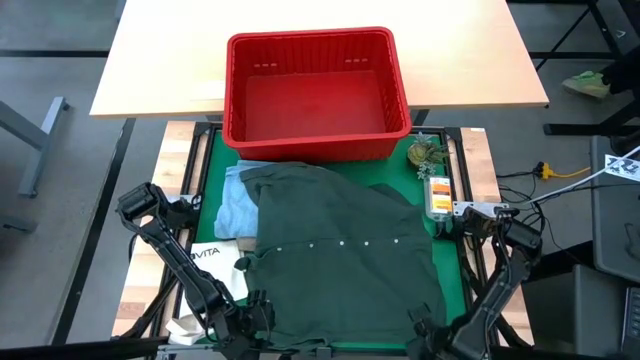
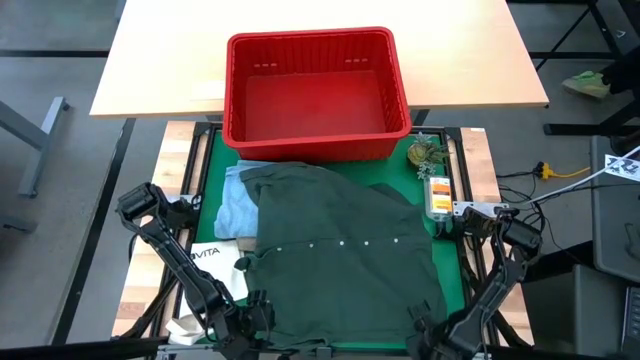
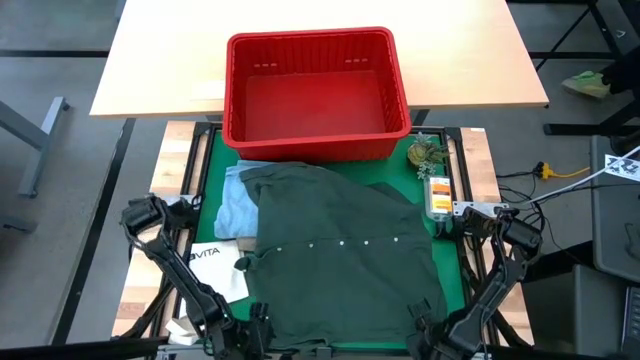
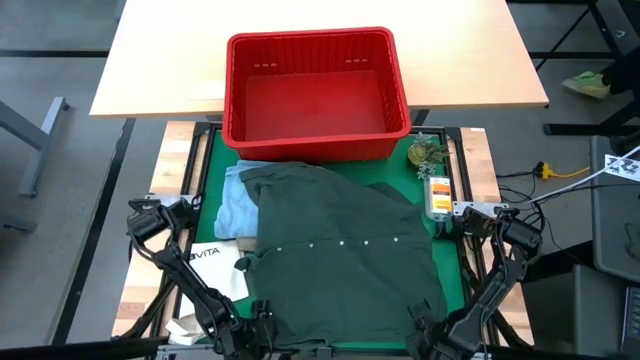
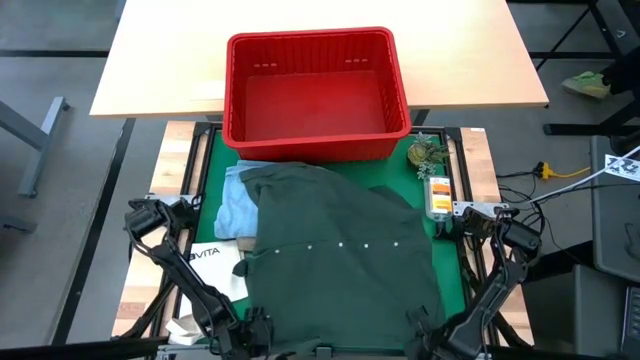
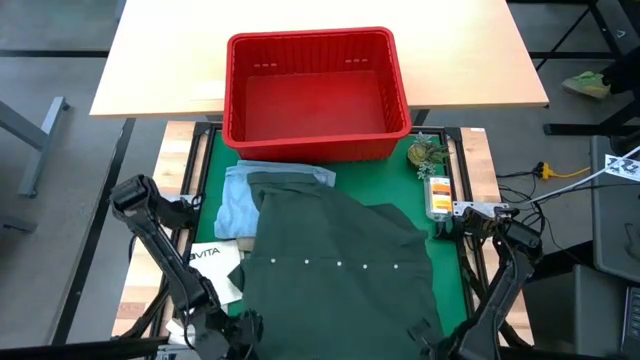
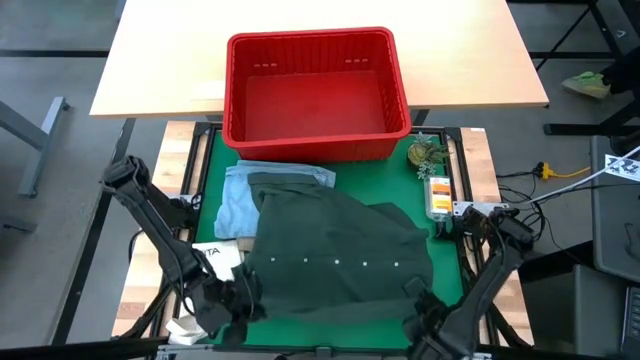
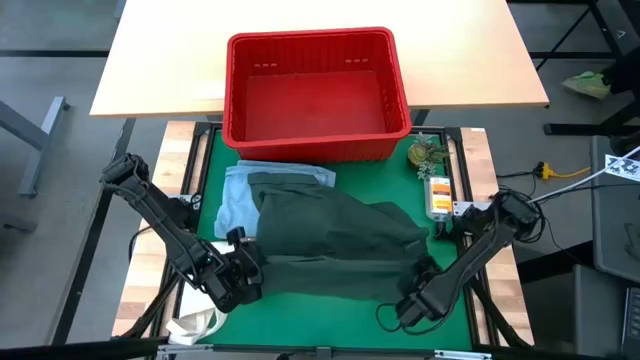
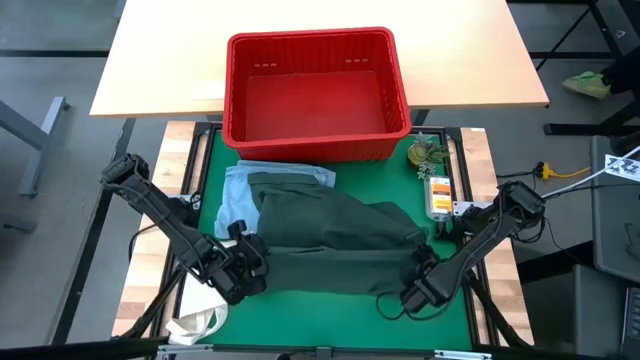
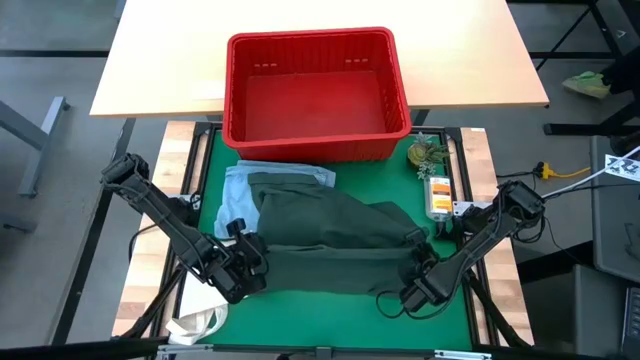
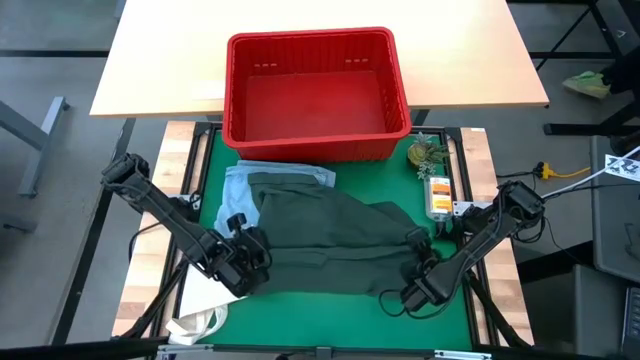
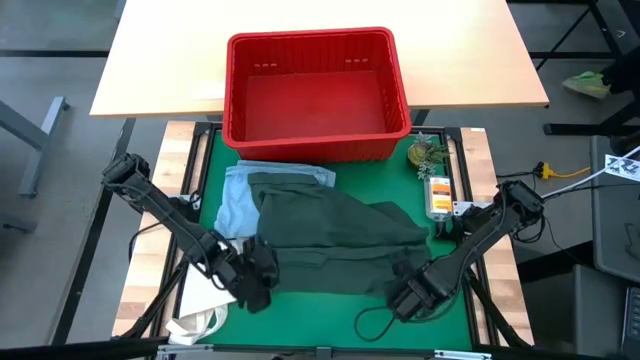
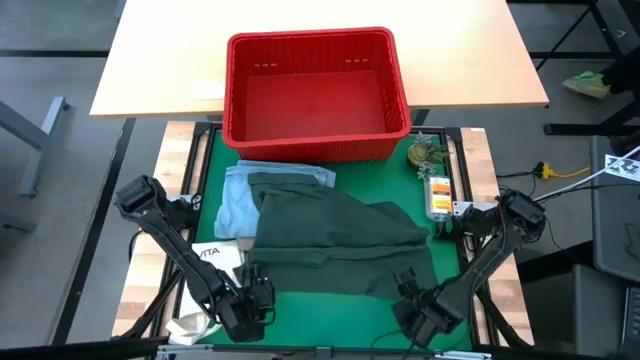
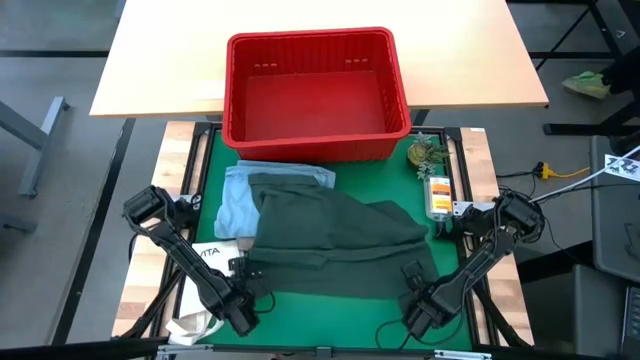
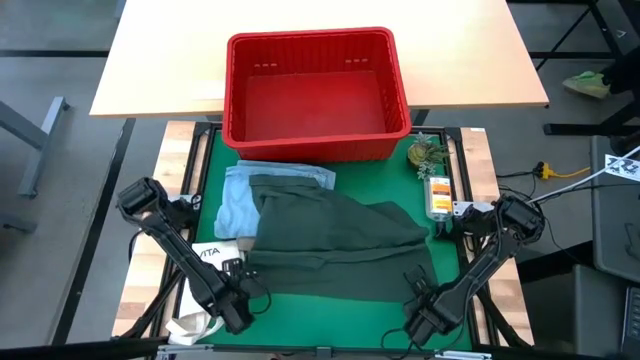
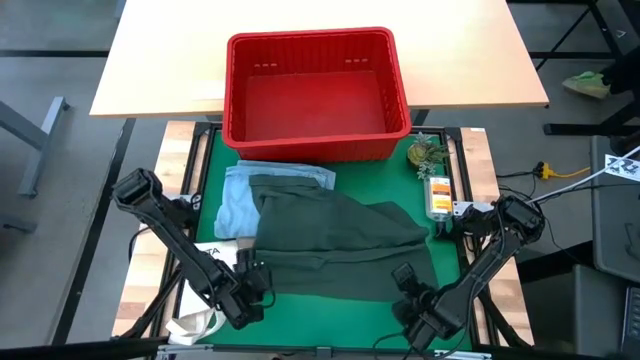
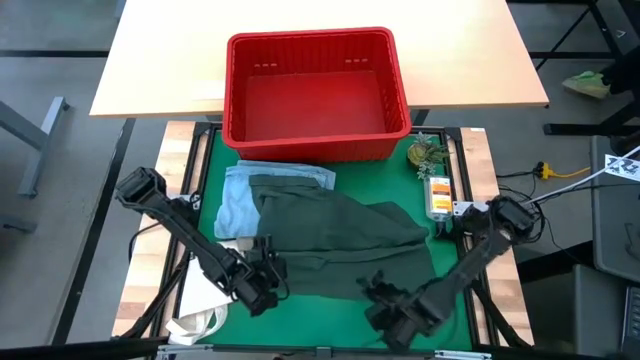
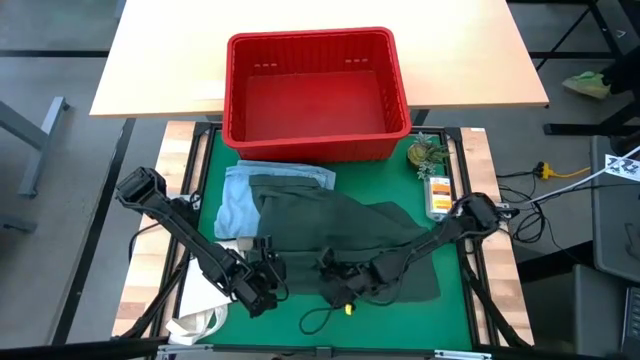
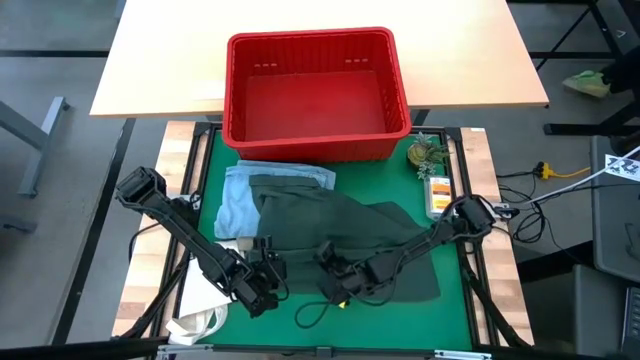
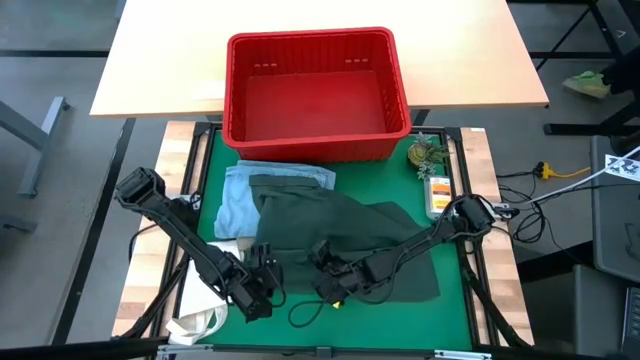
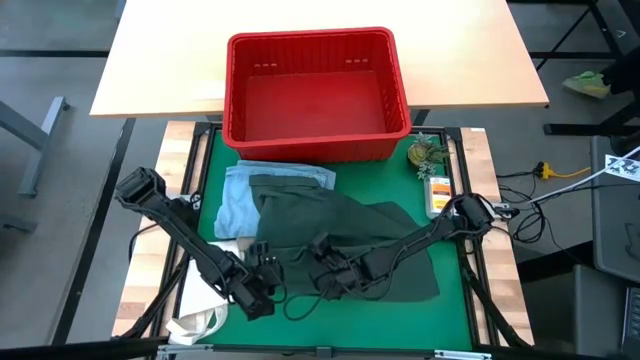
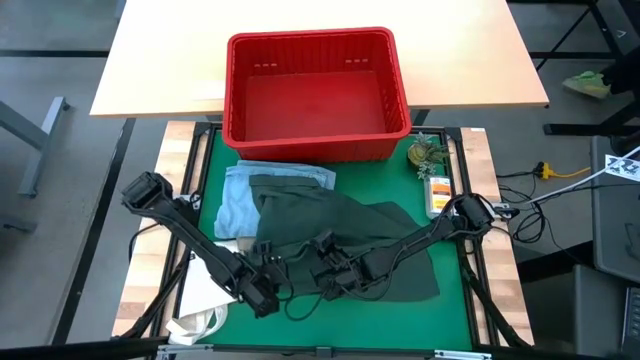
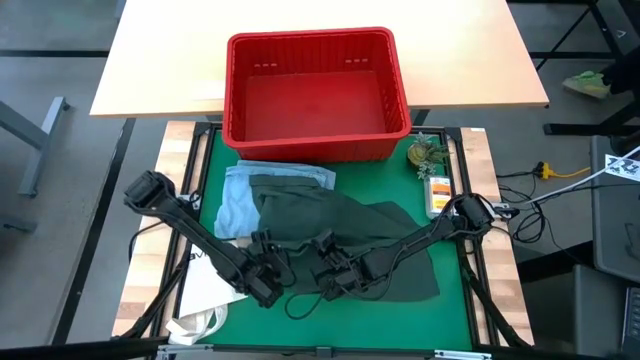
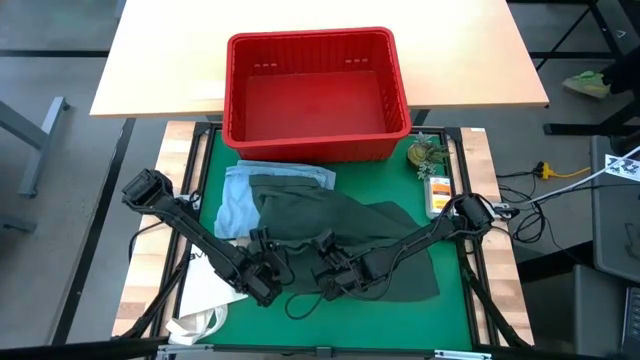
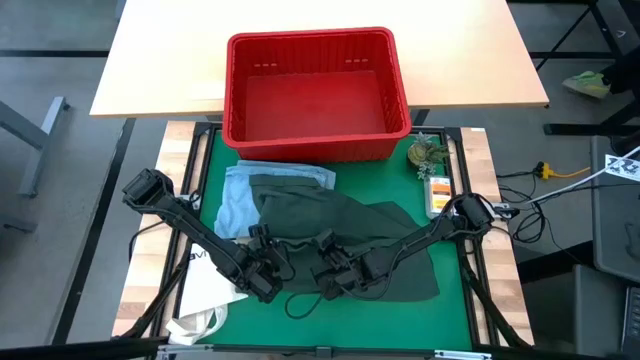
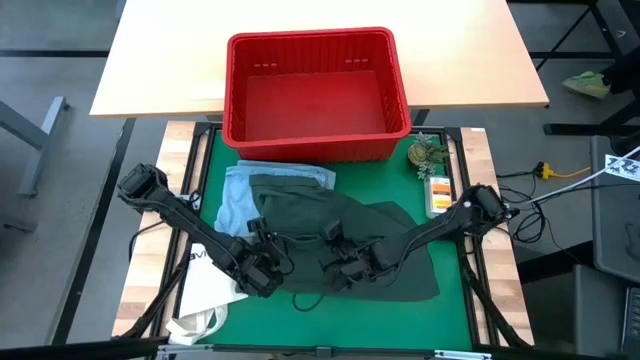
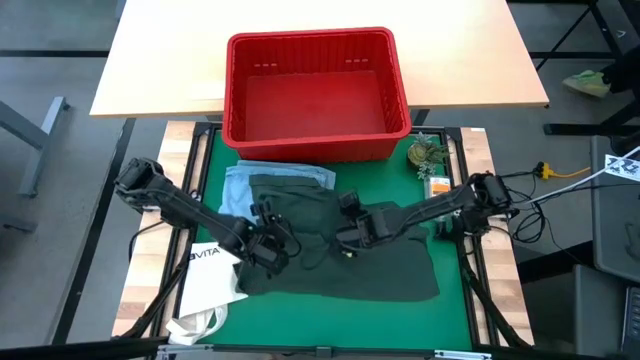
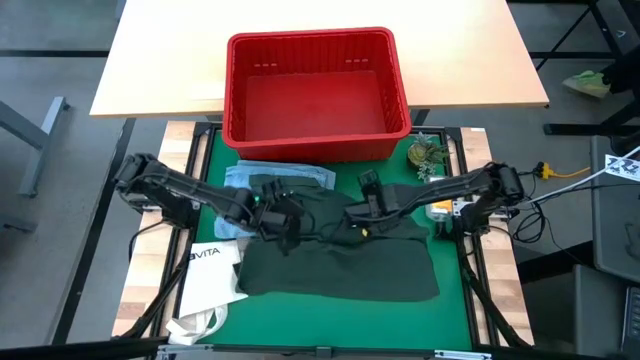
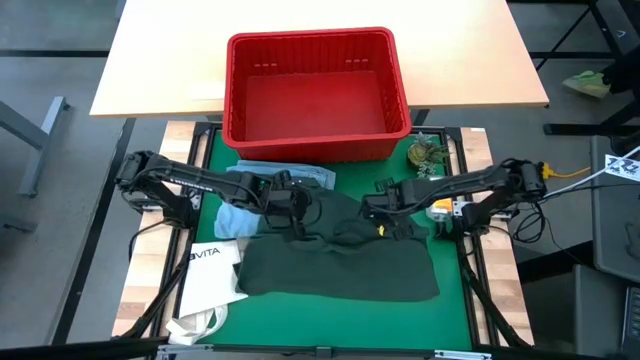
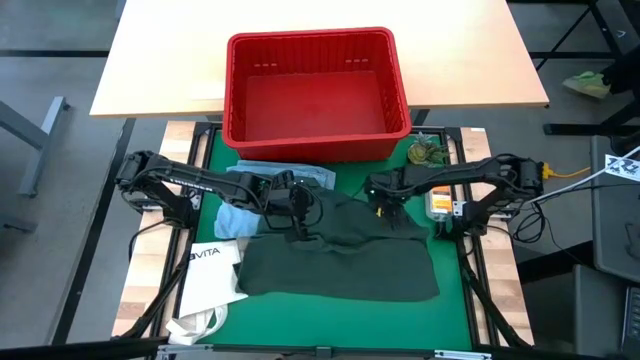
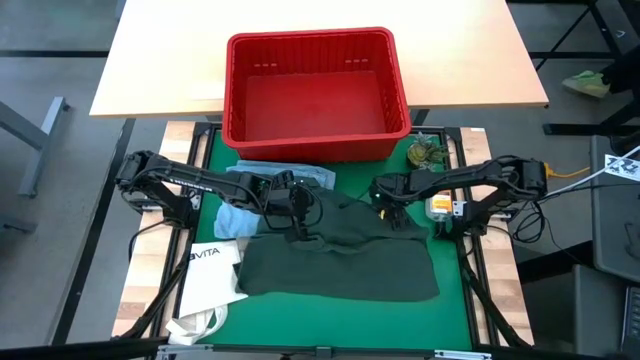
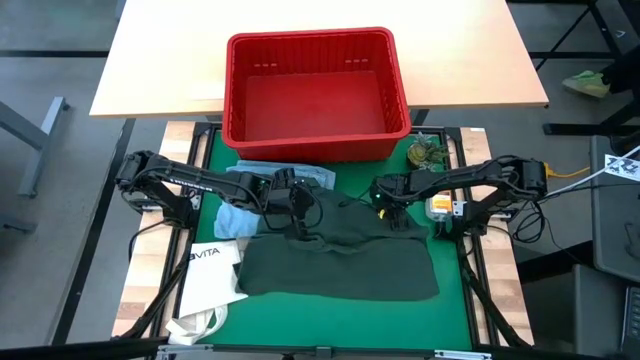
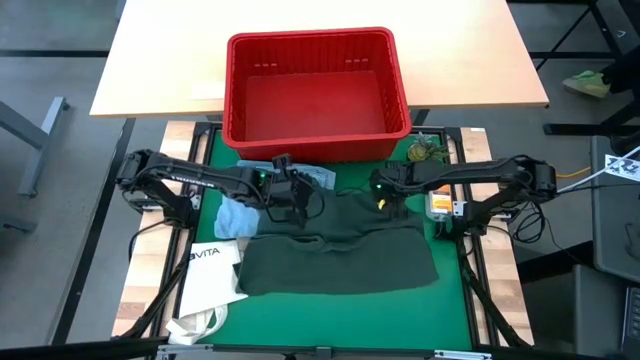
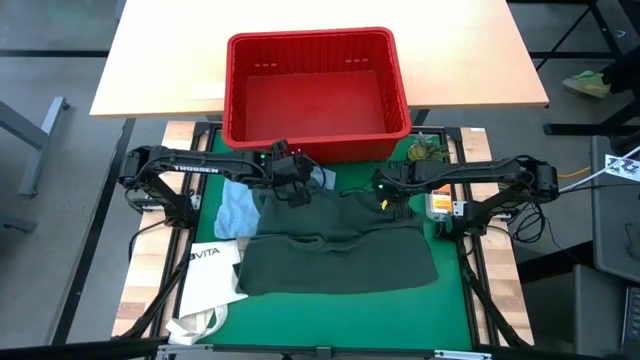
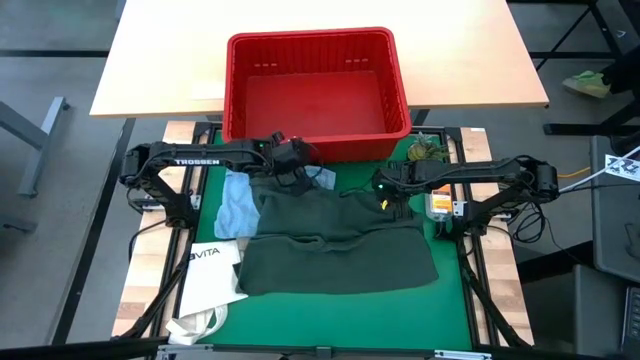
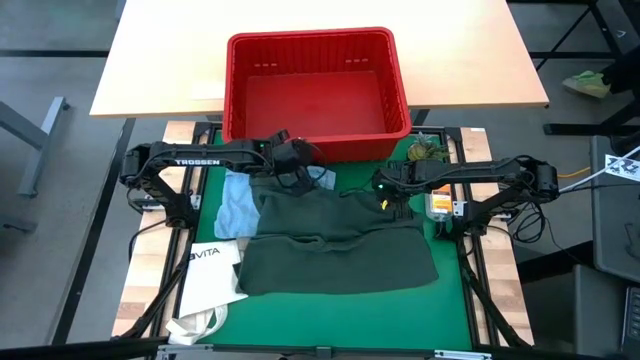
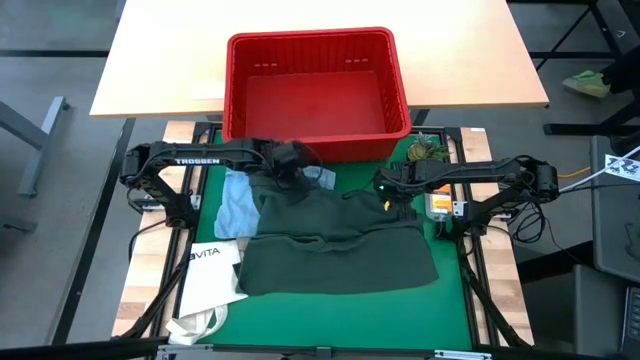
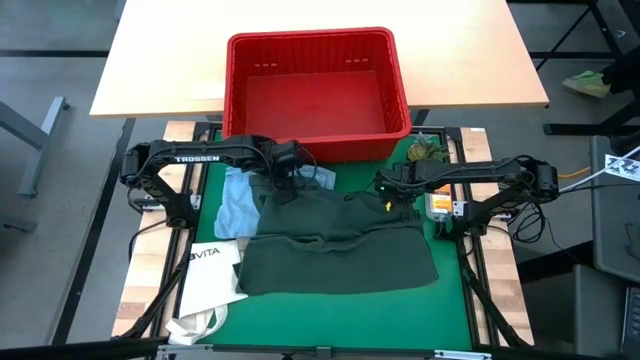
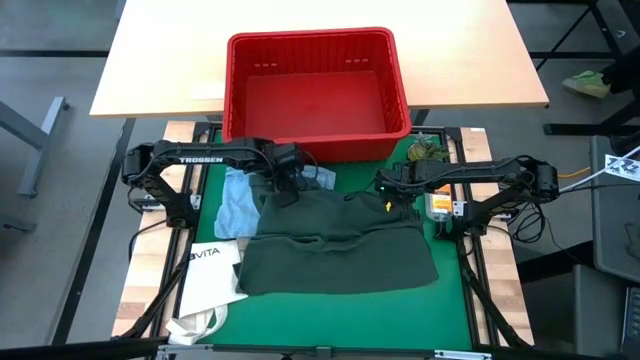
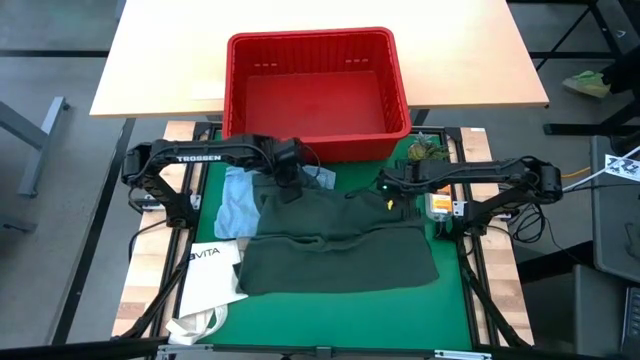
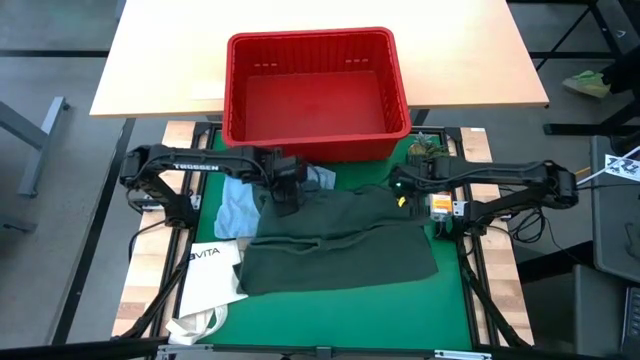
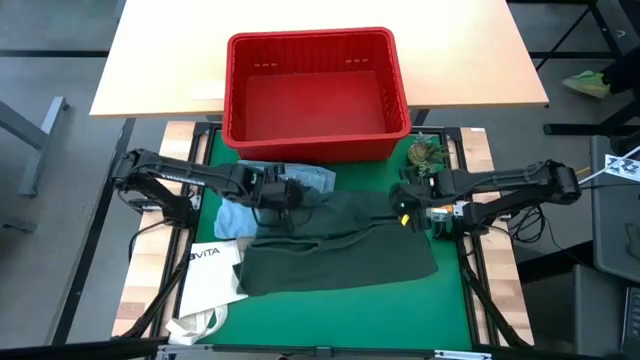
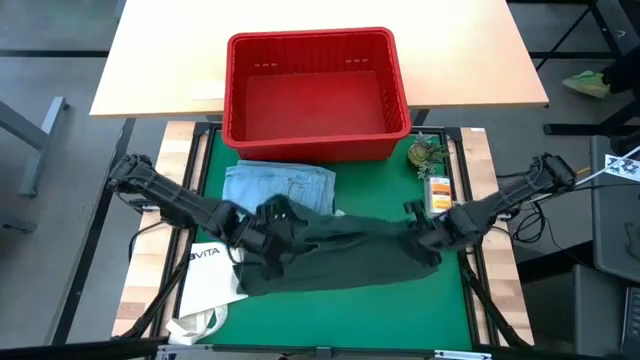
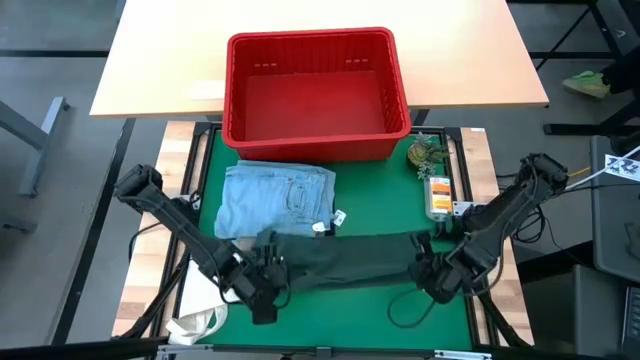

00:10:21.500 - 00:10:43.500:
Task: Fold Laundry from Bin
Fold the green polo shirt
